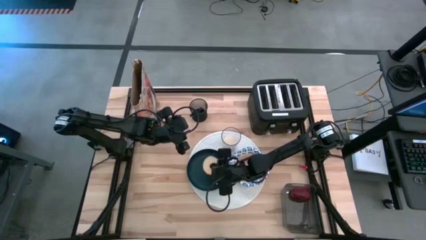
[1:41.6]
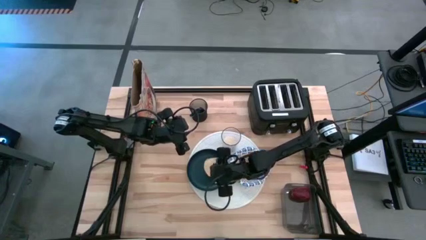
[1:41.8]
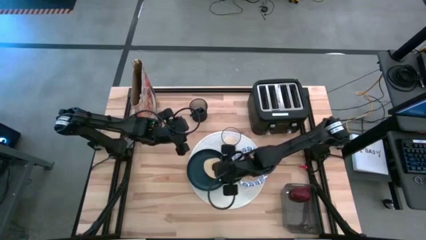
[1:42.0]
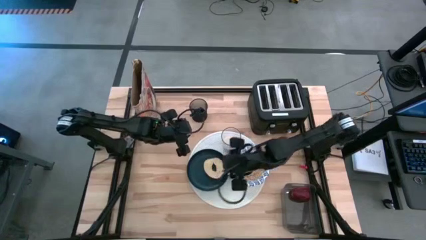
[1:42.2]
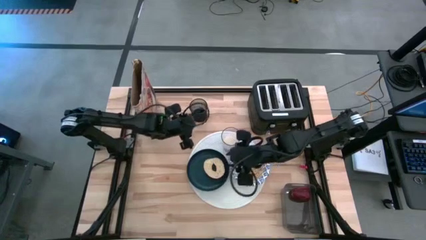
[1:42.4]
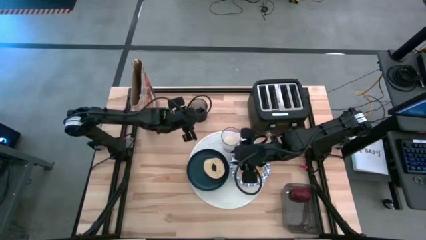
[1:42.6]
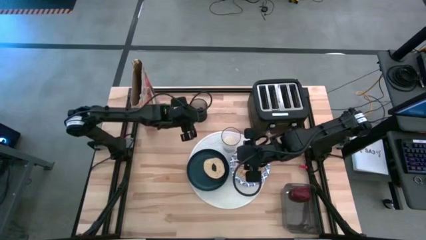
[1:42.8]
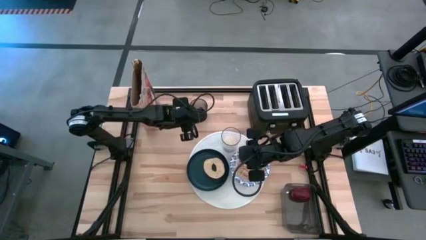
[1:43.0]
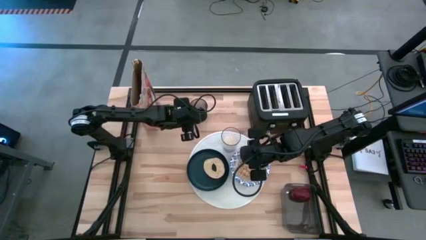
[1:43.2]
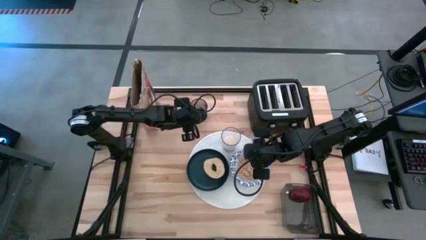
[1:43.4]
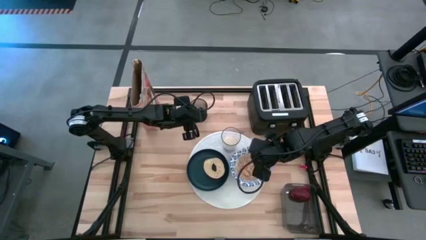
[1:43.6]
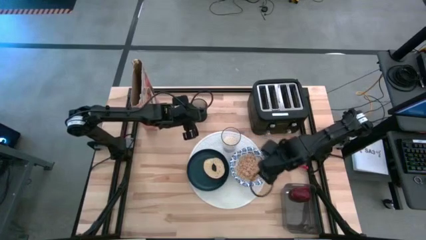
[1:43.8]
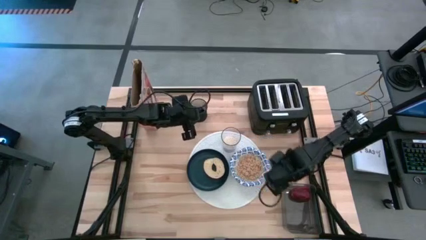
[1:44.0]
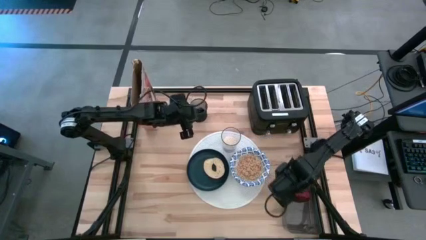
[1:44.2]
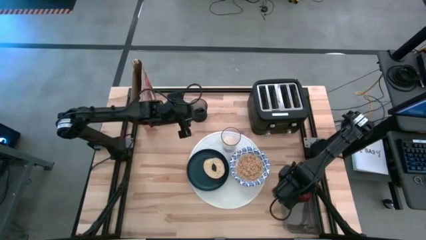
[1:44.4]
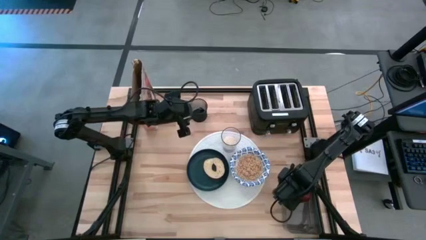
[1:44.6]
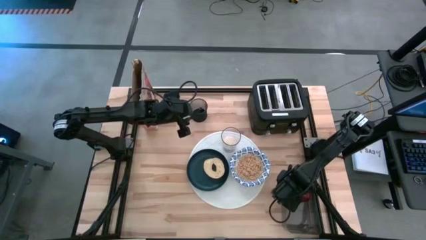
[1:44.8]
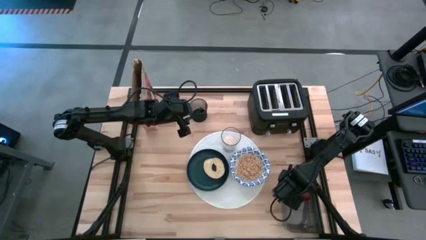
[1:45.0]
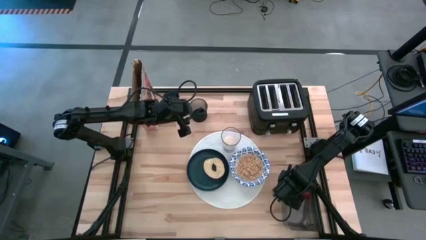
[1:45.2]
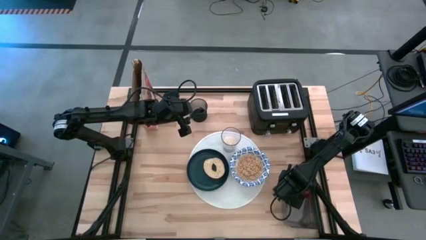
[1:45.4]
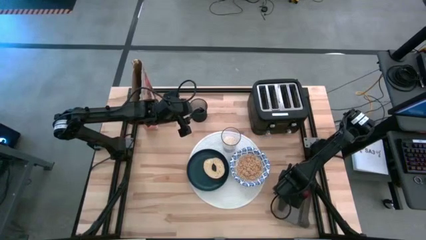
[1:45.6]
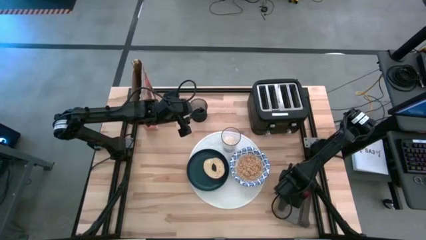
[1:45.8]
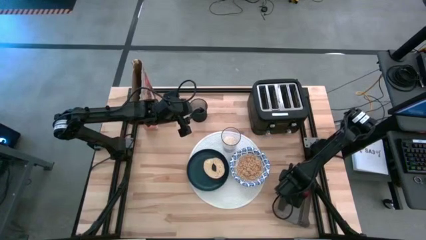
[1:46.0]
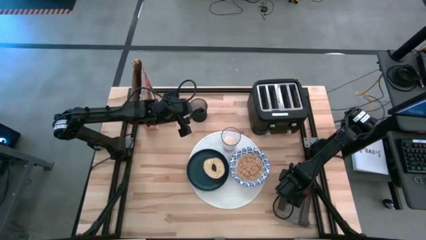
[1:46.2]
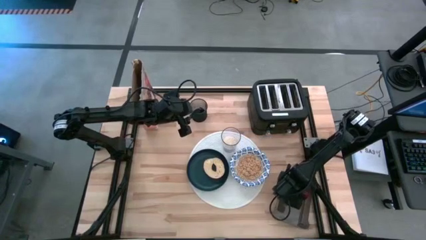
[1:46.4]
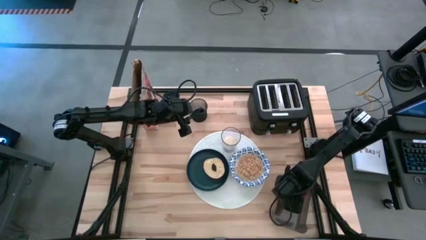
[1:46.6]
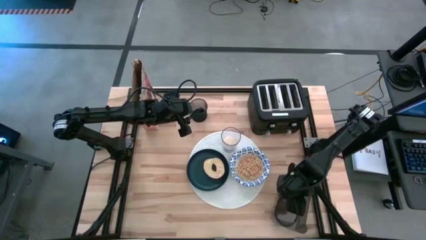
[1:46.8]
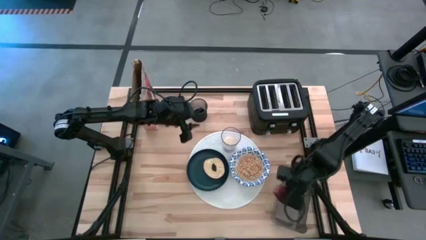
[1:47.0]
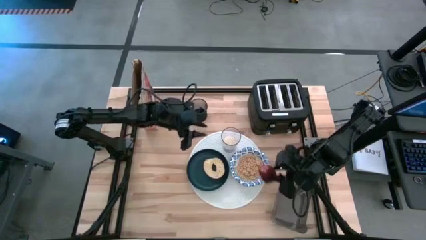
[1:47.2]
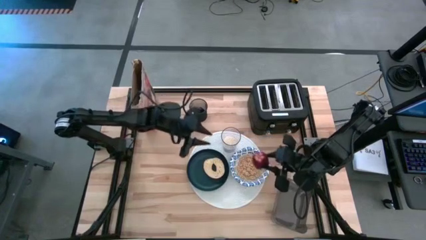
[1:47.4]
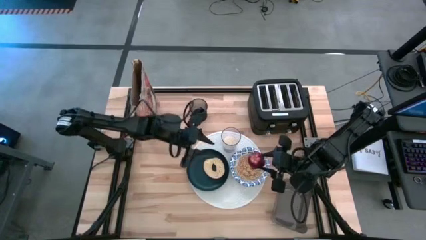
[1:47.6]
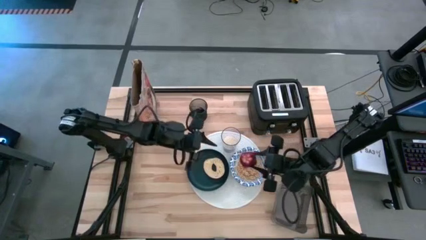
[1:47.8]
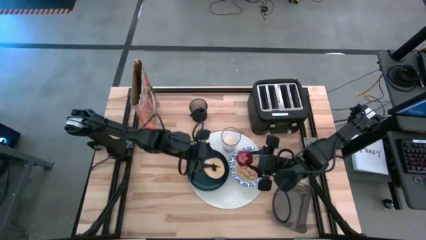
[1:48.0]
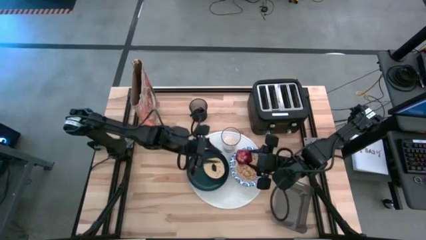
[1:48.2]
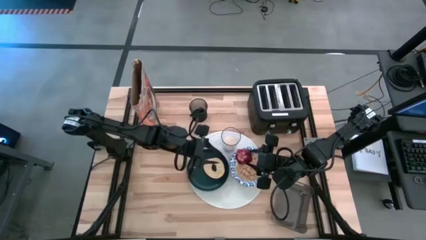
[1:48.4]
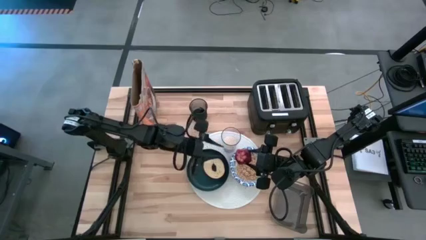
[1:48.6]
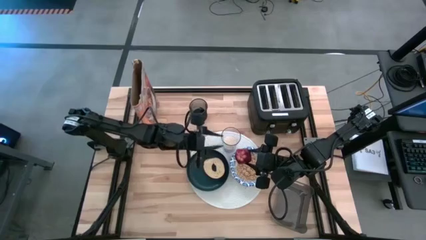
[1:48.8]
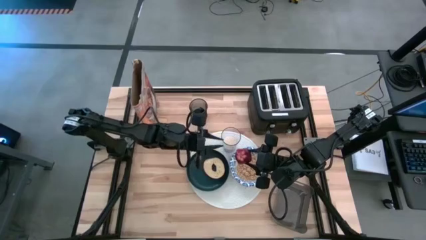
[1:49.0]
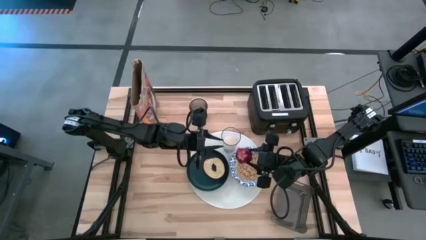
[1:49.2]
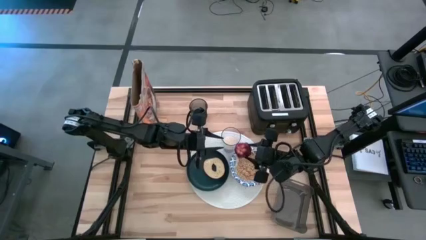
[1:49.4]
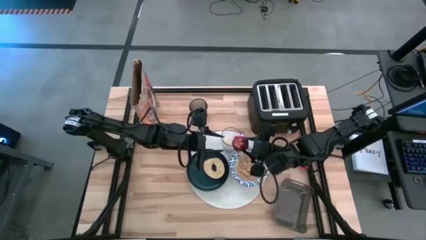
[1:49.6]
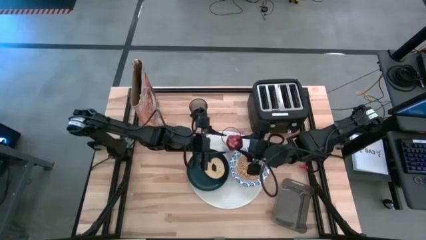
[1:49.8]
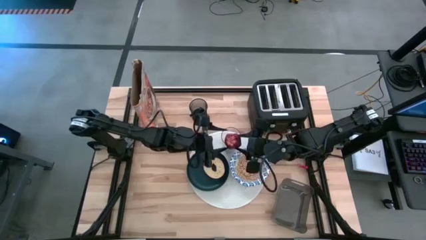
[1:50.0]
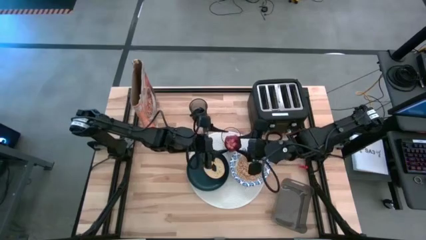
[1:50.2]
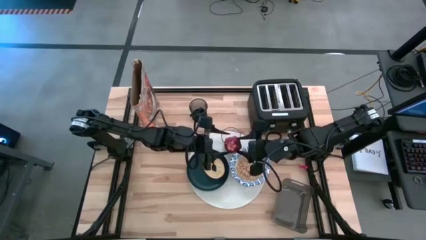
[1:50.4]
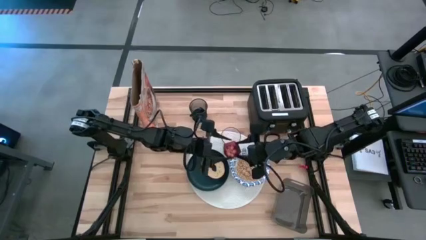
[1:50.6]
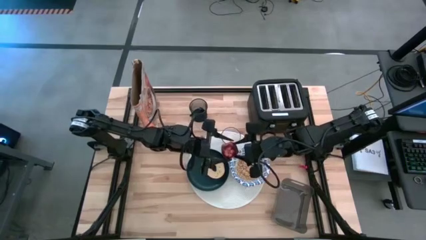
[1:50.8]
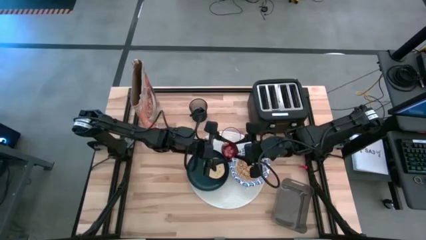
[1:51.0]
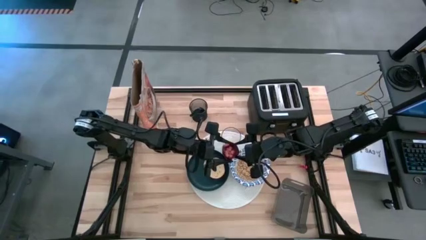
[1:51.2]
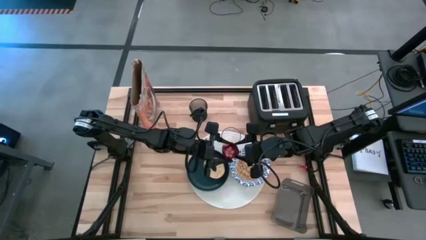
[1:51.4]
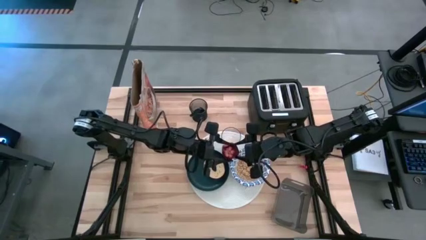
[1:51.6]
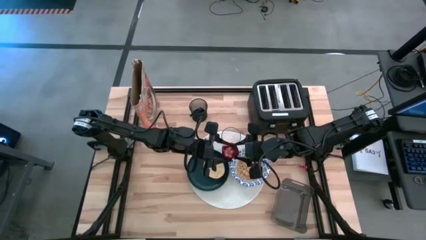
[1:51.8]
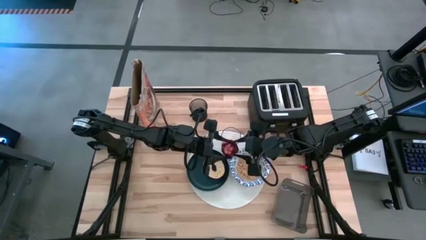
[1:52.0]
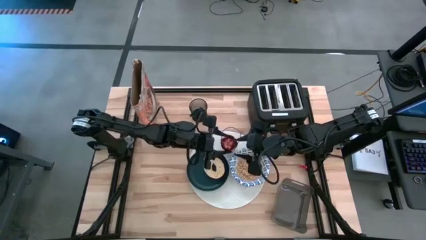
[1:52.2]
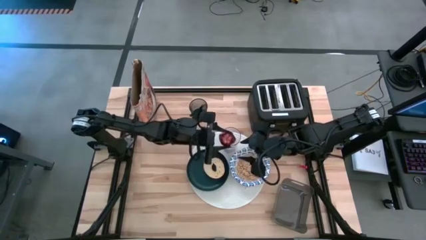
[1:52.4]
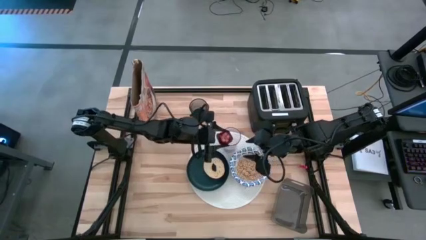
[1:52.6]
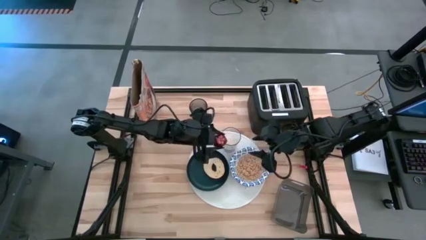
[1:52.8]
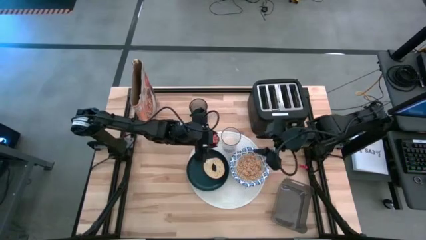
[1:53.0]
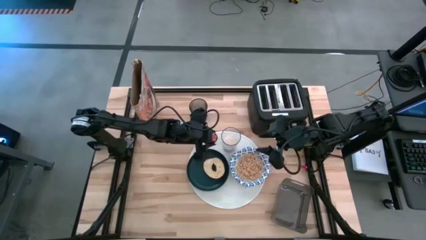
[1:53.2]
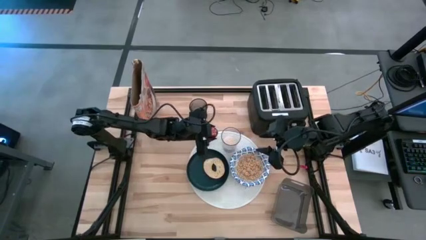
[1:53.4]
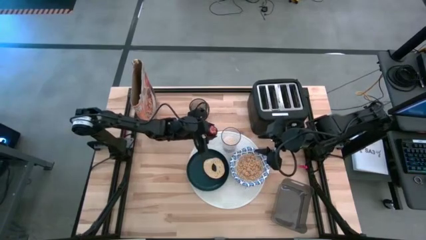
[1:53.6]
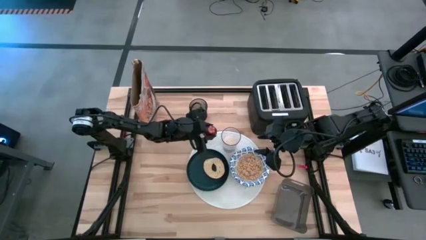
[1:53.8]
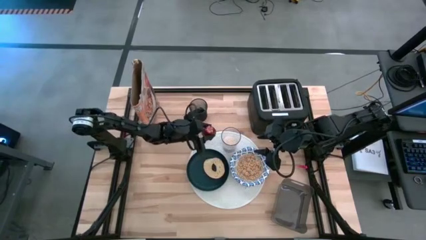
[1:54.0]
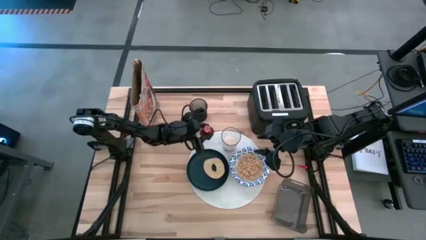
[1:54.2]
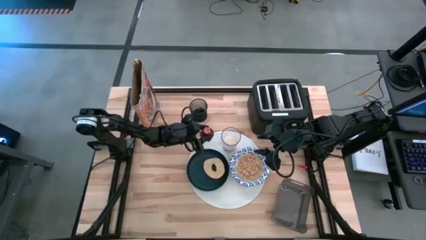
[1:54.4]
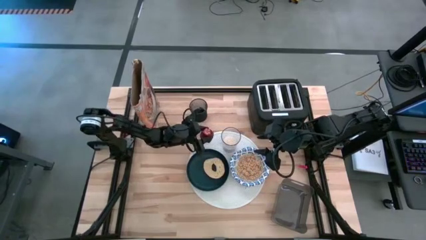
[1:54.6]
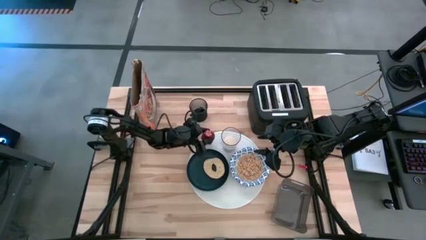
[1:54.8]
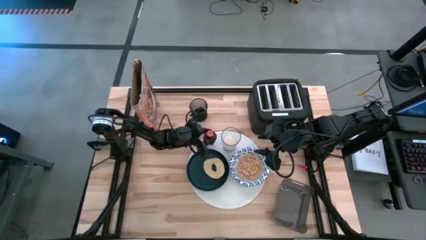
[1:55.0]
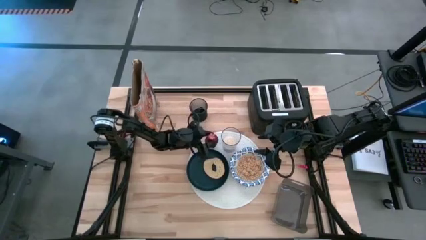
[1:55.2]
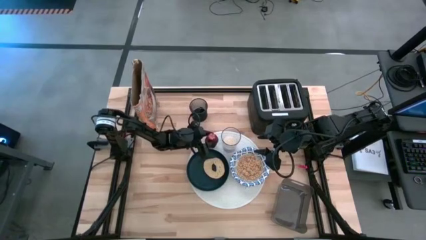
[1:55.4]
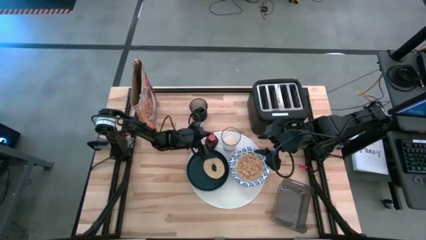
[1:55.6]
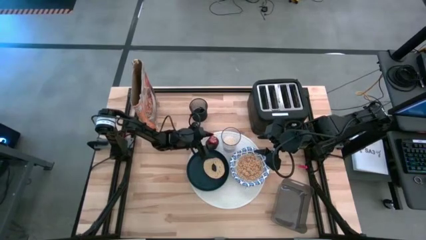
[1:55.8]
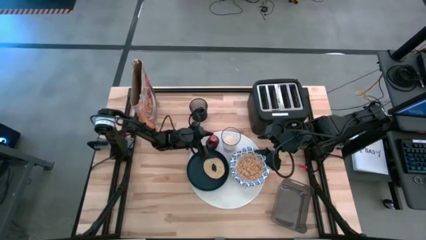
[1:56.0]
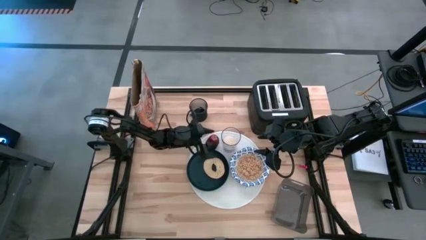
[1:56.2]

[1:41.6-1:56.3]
Task: Arrange a breakfast setting
Put the red apple from the black bin on the dark blue plate on the white placemat

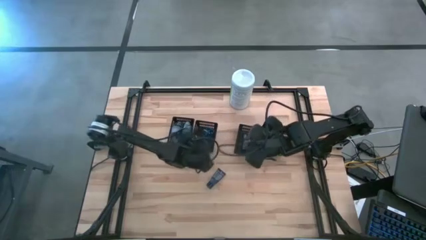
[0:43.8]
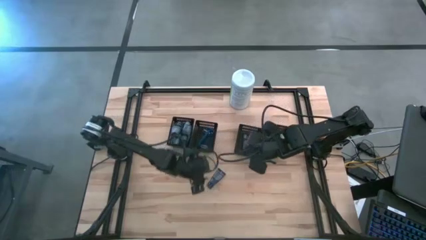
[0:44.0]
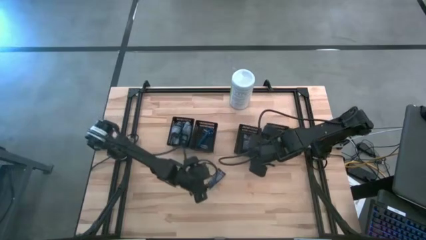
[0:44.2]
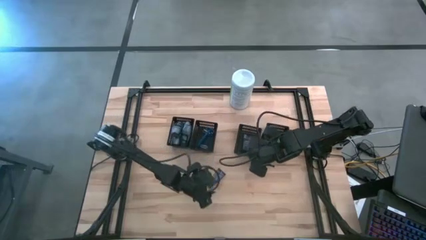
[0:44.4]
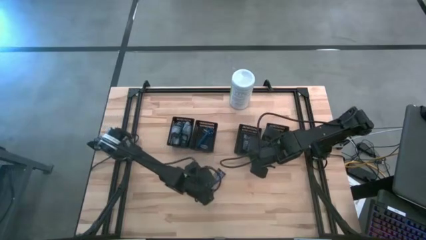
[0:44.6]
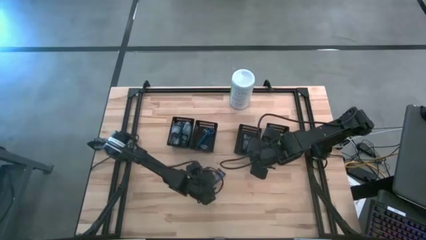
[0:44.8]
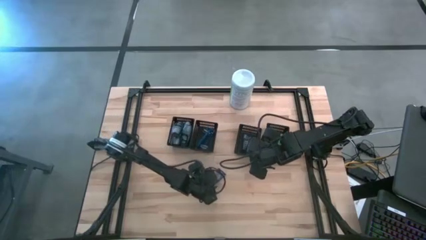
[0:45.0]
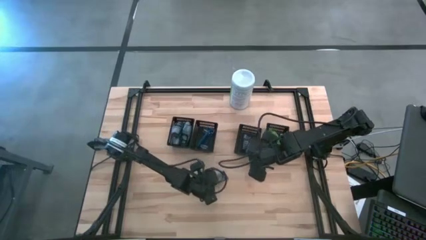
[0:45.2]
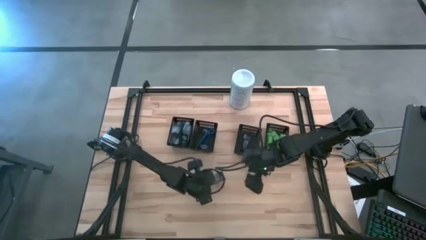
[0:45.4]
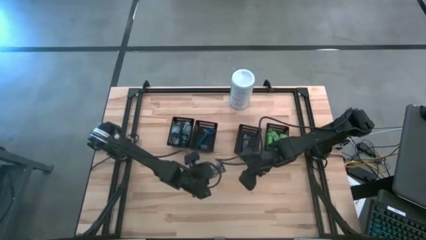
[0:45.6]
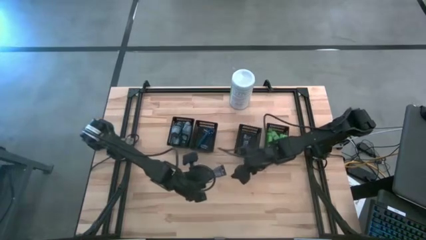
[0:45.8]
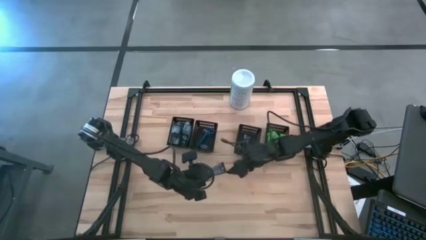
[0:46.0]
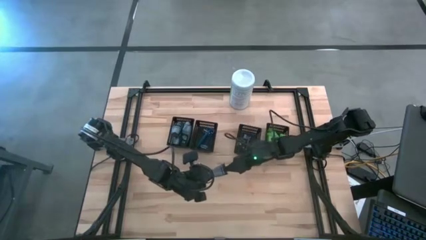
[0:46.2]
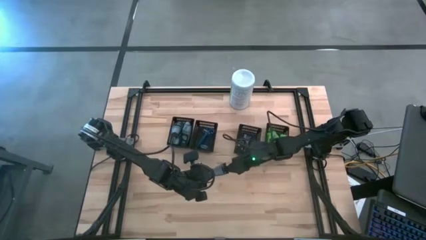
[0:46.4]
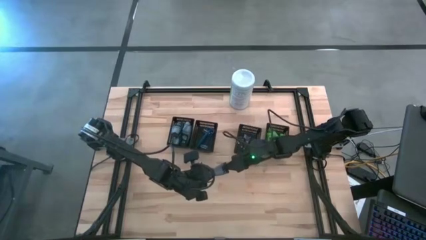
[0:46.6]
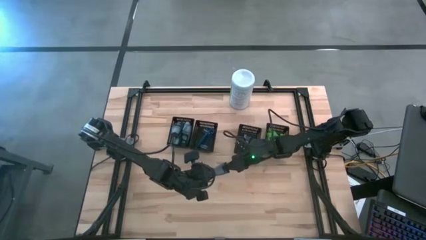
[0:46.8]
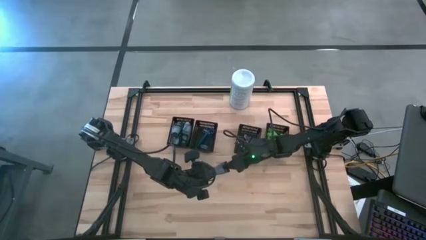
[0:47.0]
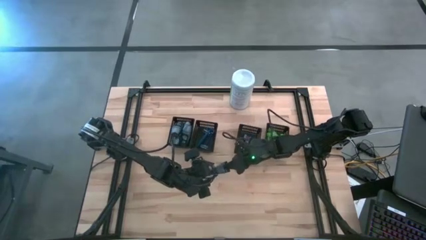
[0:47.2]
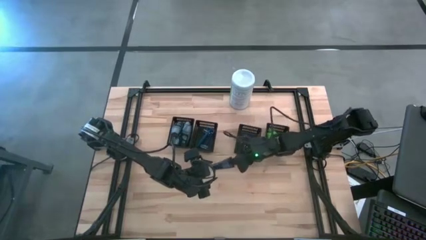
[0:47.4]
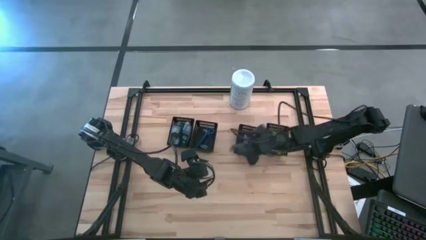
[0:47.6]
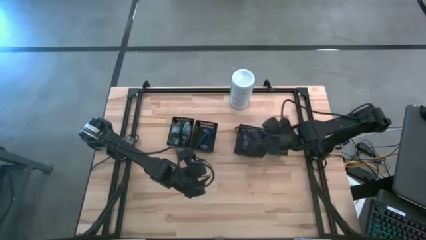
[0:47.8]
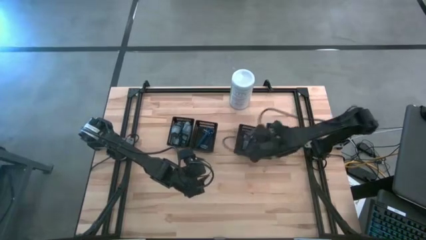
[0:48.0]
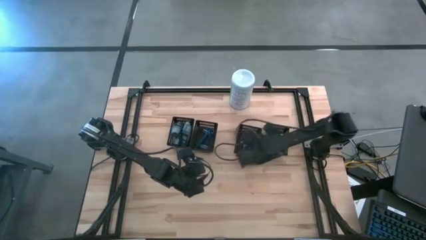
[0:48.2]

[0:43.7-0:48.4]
Task: Pick & Place Travel size toiletries
Put the blue shaver cream into the middle right black bin
